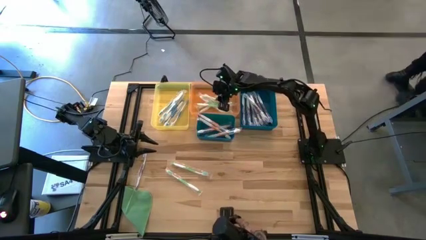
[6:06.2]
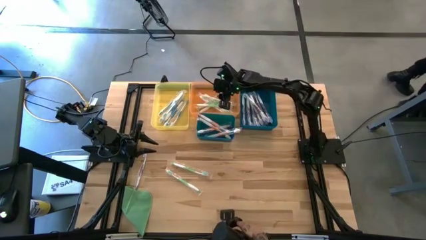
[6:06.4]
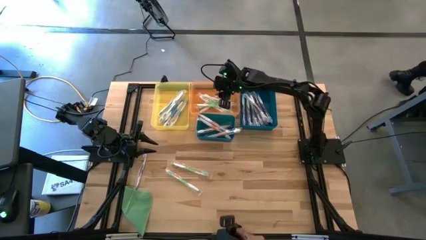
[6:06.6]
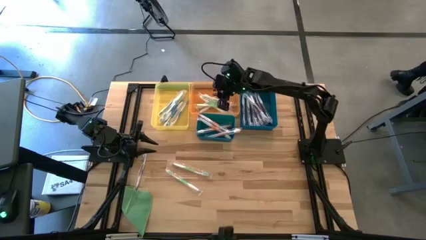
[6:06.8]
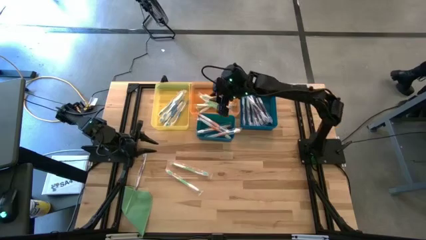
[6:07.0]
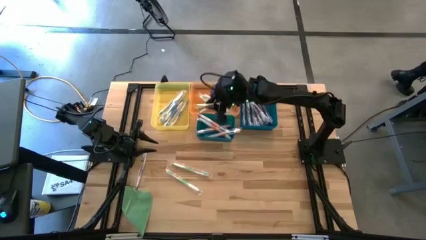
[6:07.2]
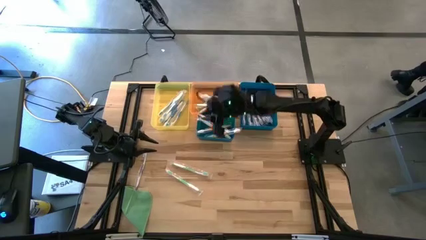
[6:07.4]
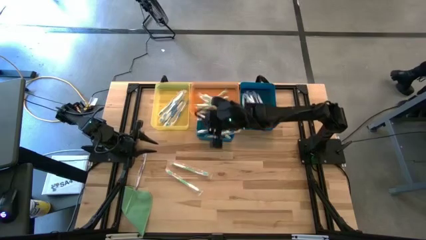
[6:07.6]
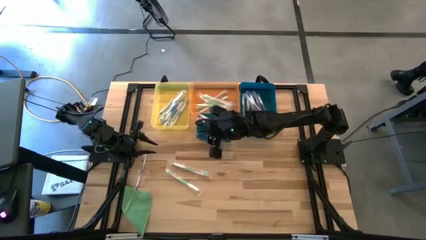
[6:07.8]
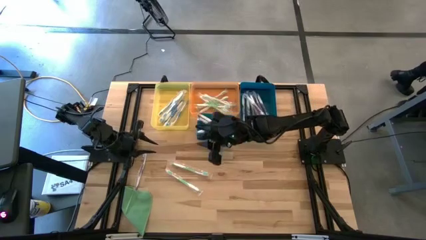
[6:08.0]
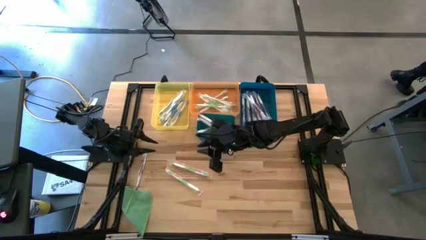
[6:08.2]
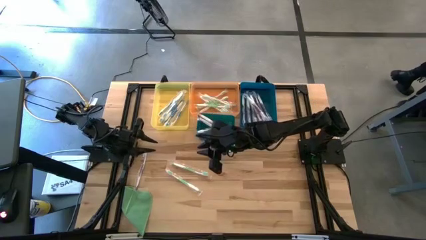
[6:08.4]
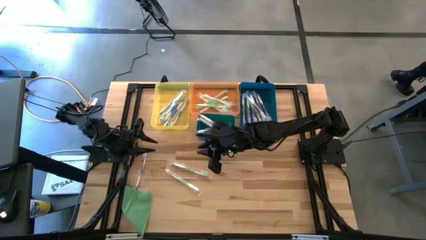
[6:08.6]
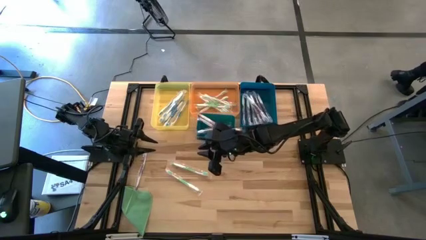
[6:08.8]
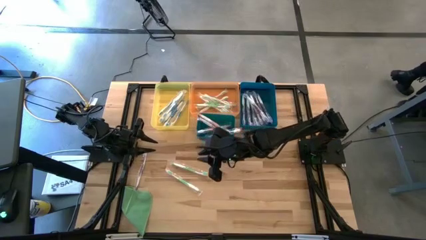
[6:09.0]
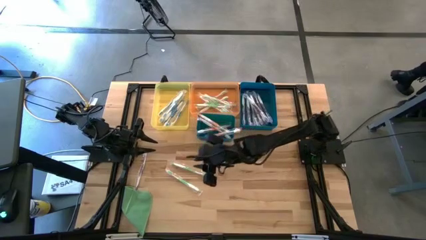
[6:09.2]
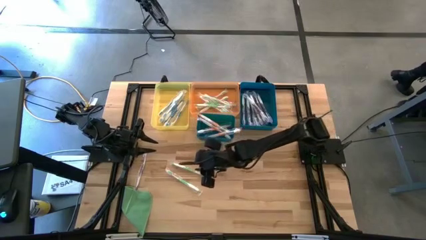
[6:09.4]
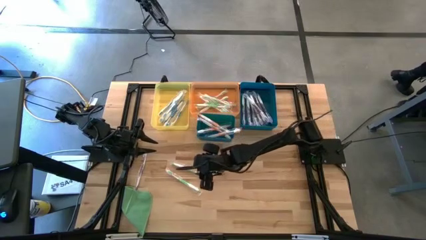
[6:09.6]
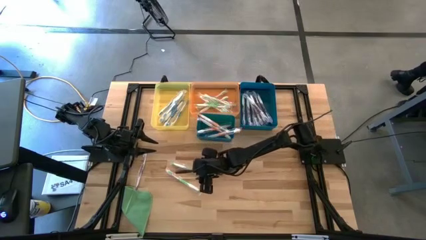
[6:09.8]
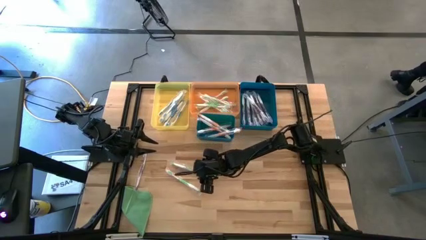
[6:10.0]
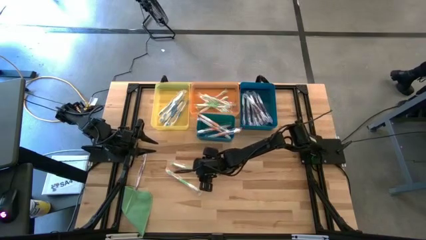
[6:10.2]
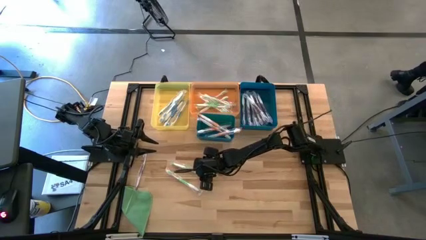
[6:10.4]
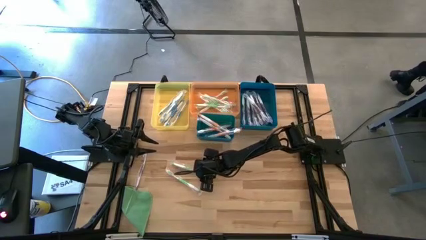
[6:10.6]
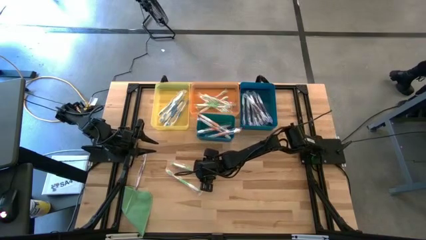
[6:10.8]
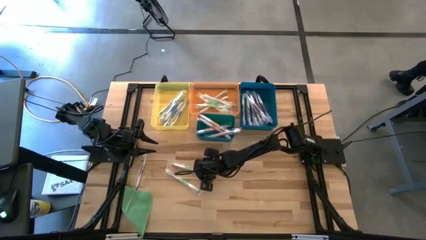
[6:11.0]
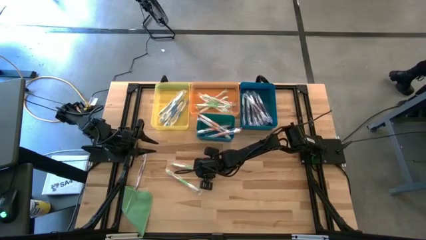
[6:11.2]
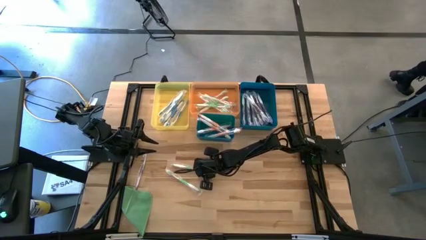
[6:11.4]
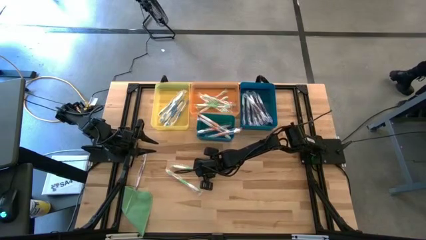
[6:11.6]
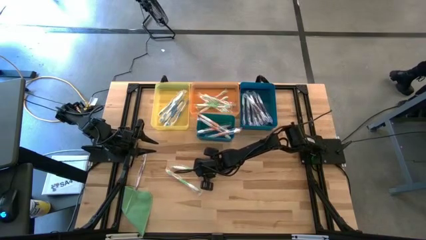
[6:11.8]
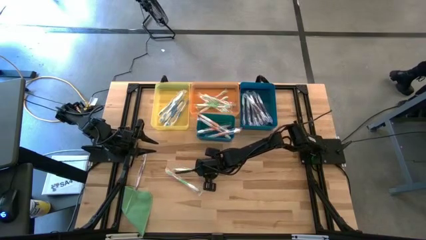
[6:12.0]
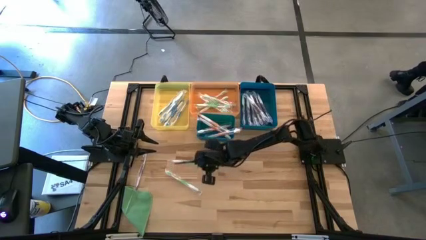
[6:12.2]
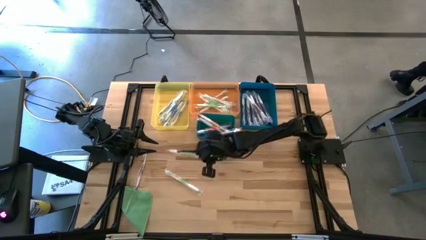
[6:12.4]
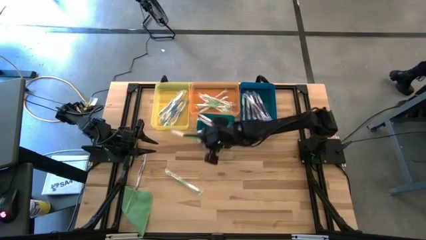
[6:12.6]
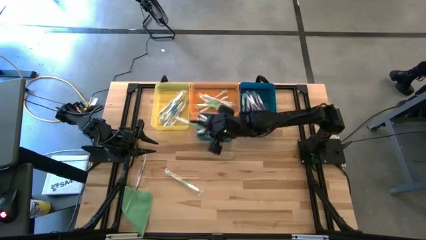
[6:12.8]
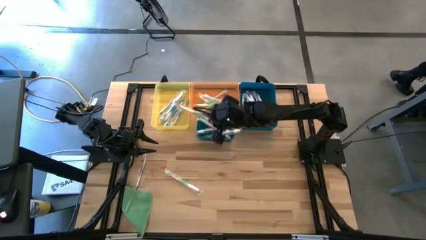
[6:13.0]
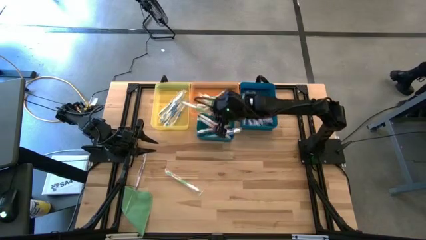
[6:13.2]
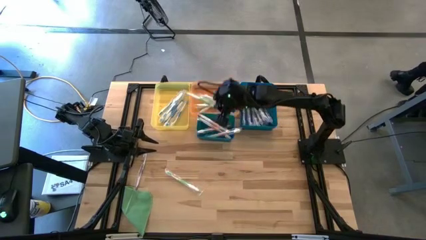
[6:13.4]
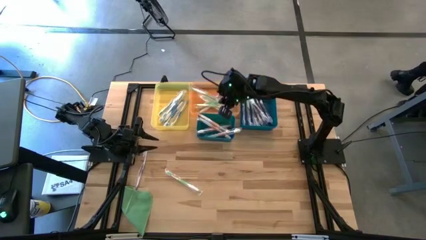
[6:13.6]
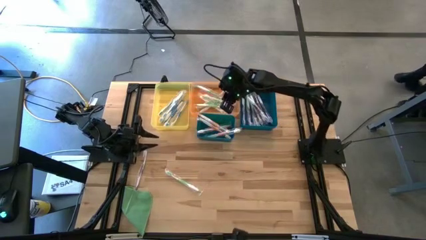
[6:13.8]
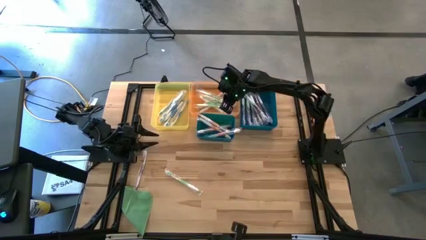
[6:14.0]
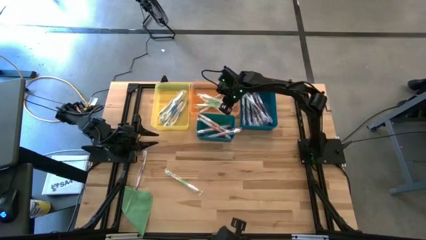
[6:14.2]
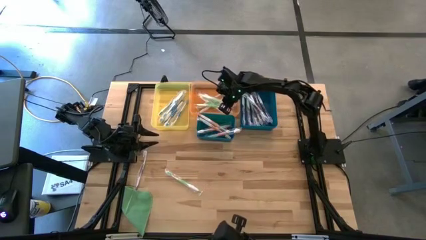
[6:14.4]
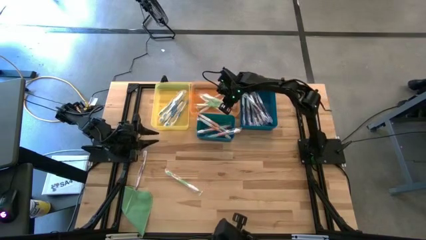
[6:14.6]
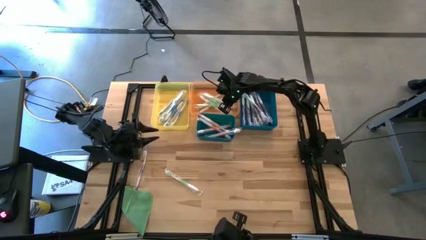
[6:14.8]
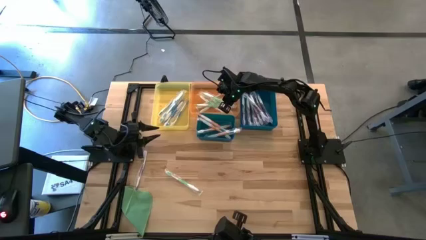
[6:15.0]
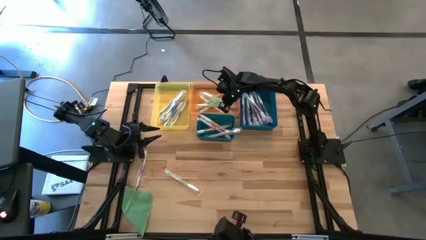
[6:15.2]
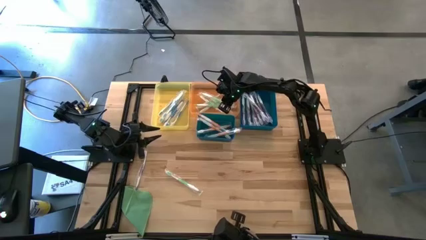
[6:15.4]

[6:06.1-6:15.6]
Task: Pick & Place Toothbrushes
Put the green toothbrush into the orange bin

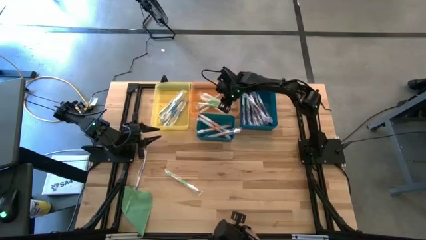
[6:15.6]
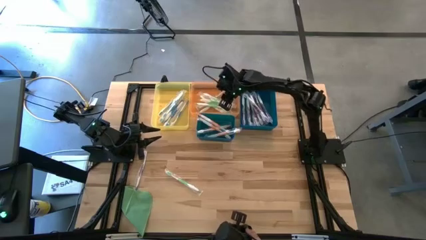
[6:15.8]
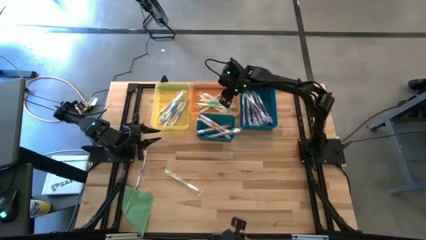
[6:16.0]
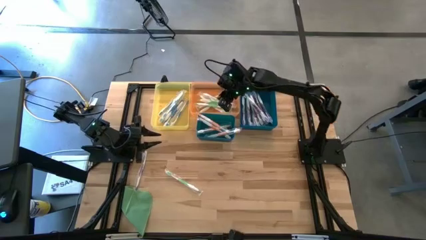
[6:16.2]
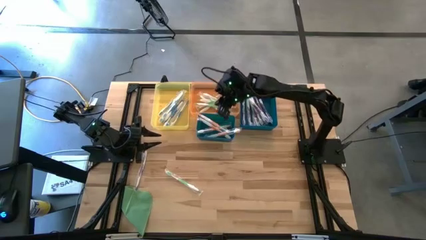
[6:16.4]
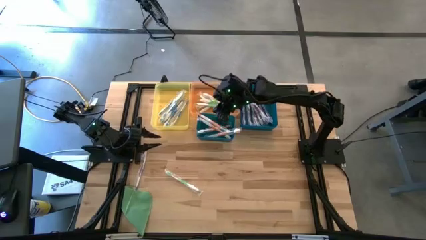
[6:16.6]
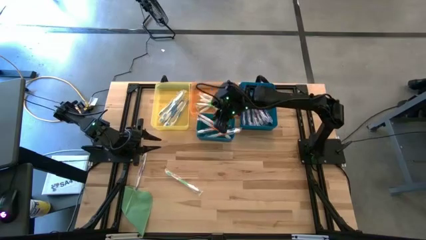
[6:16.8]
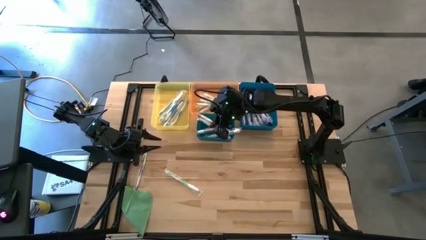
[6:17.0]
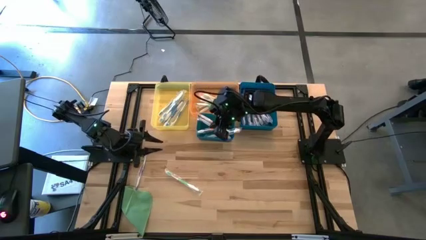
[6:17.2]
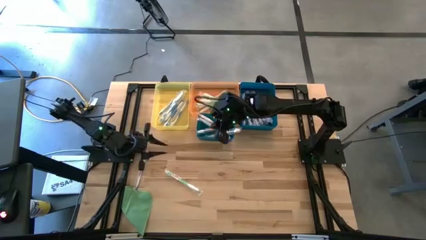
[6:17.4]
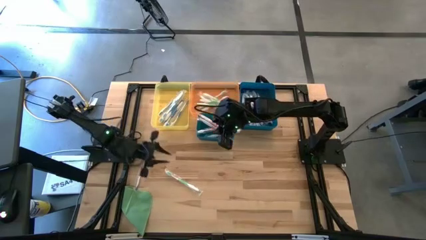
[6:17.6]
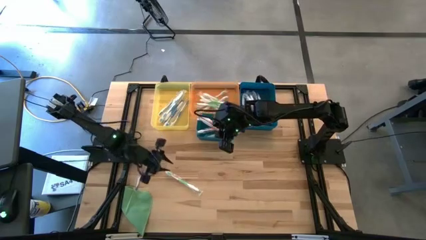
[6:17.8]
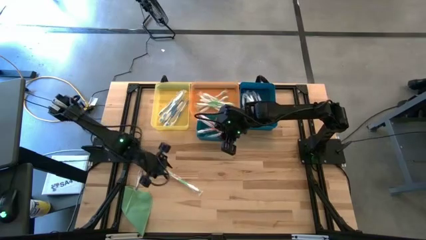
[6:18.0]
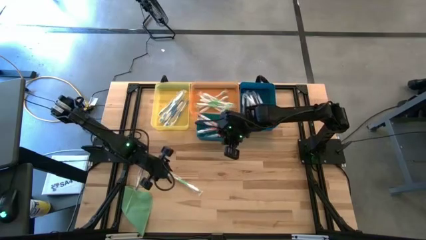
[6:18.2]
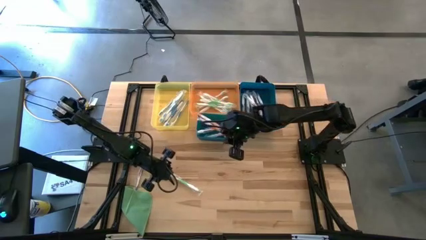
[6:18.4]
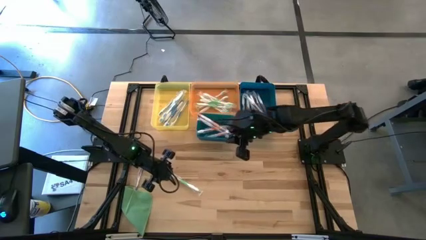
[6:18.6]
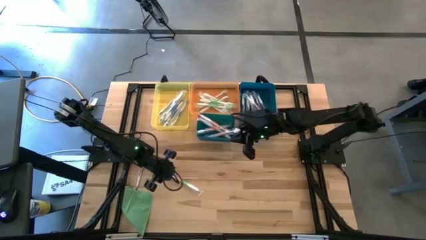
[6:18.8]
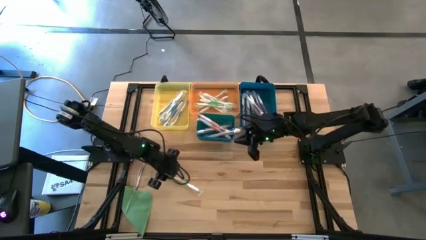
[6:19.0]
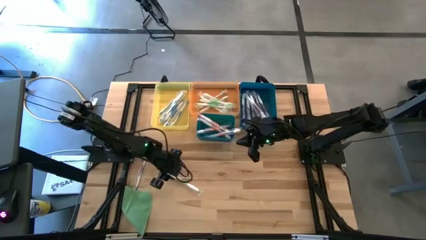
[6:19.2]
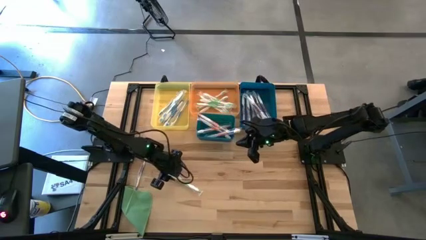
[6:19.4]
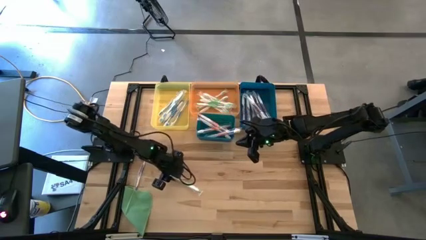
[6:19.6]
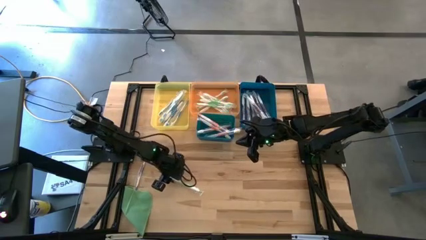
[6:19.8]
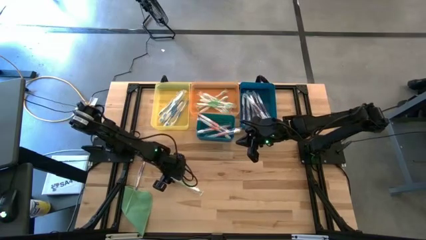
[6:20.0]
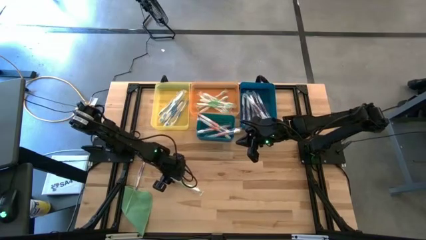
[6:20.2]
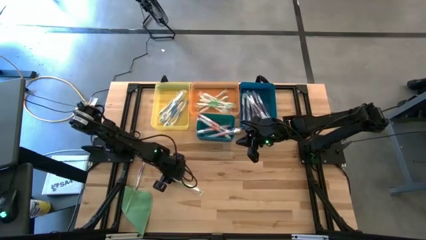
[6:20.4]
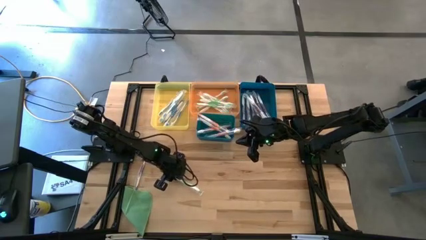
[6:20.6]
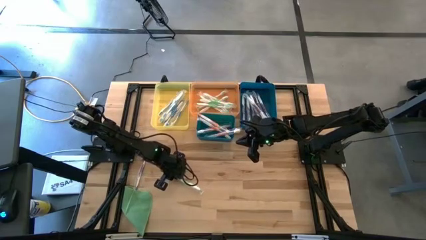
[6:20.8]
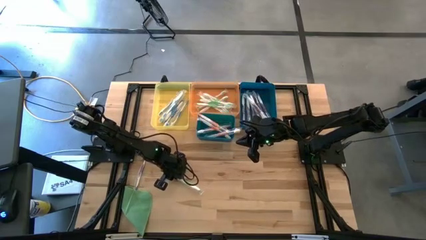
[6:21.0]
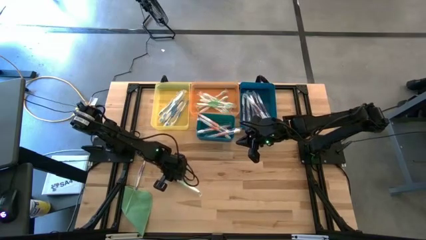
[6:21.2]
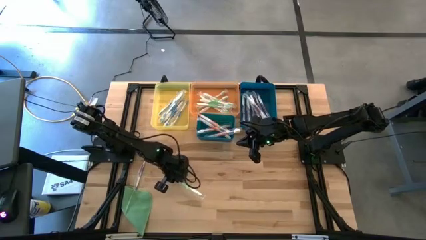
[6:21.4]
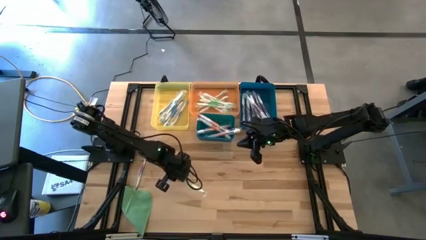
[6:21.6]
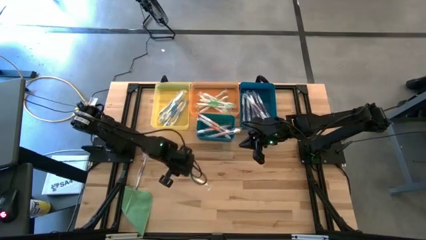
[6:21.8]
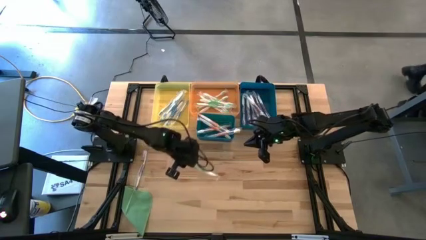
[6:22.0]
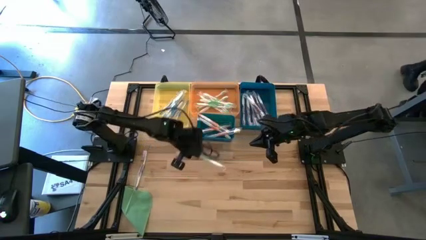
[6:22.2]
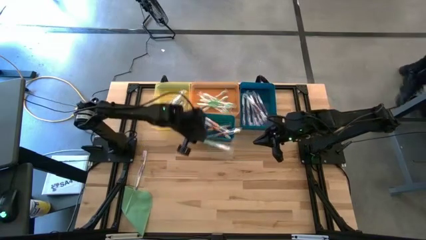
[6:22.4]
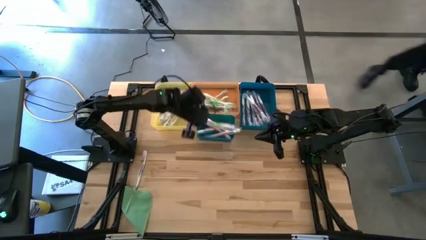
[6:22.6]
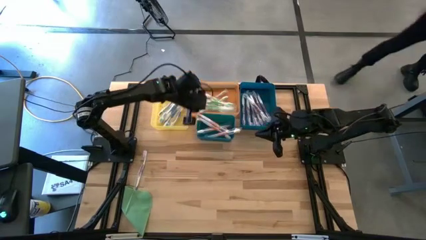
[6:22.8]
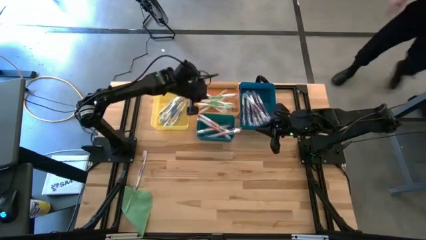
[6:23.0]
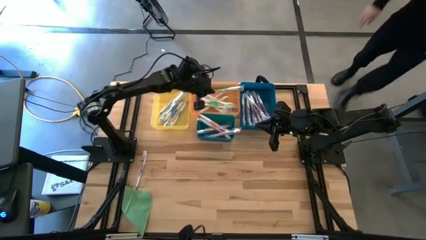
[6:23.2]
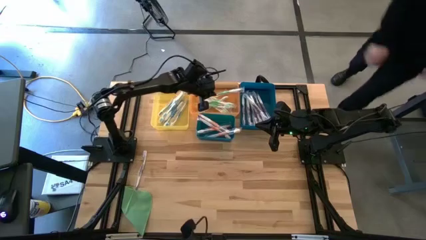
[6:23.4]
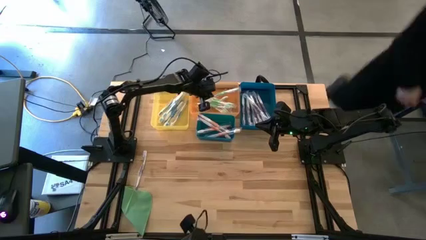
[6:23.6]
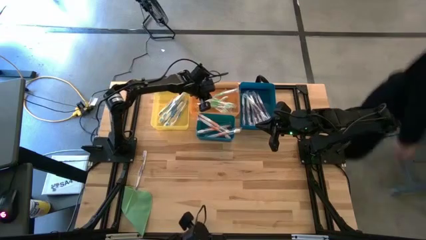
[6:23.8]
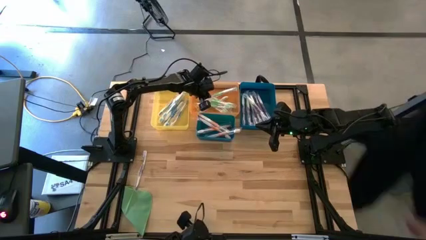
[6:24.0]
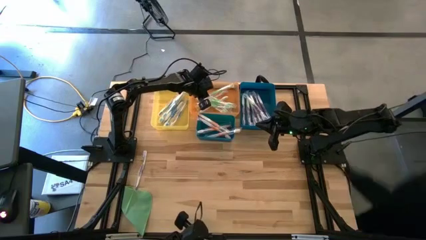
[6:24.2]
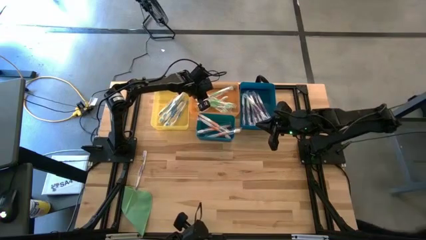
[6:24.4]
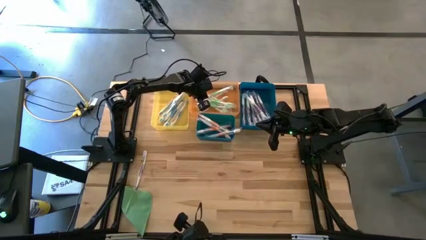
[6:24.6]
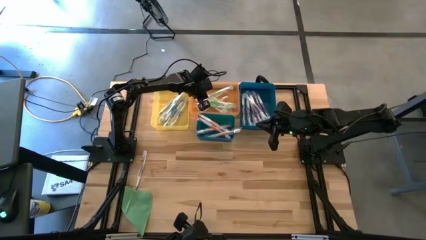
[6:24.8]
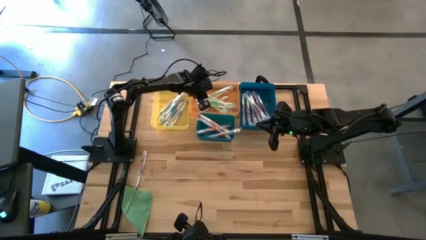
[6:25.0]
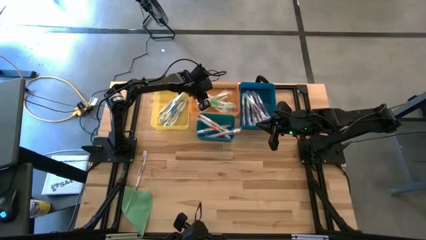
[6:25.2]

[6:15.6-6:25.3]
Put the green toothbrush into the orange bin
